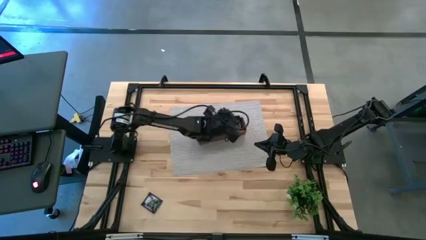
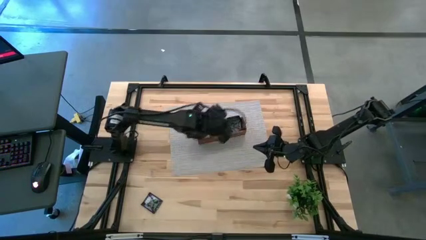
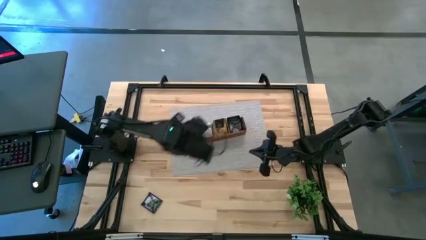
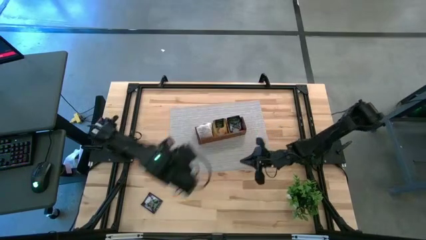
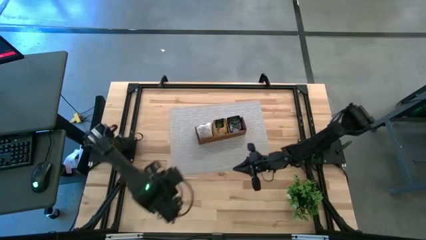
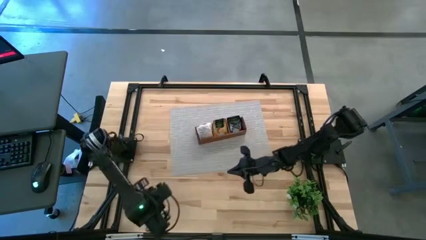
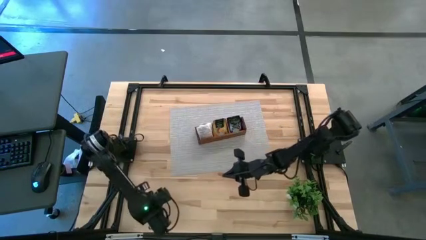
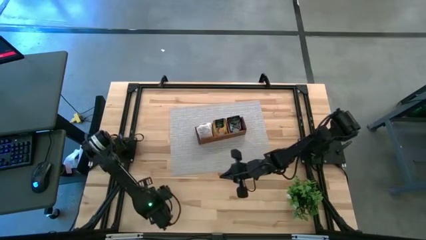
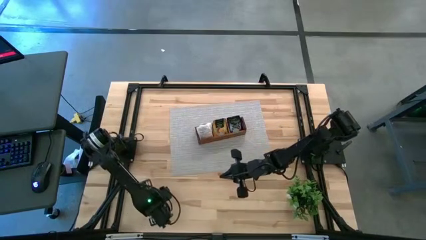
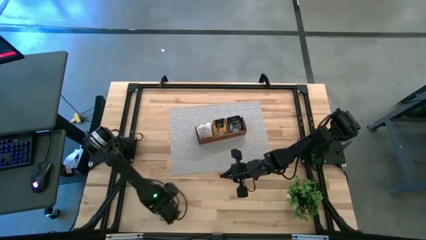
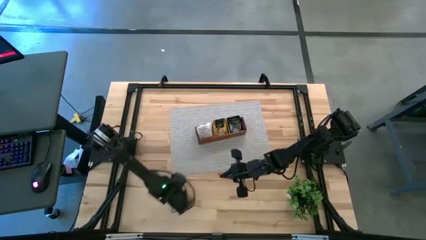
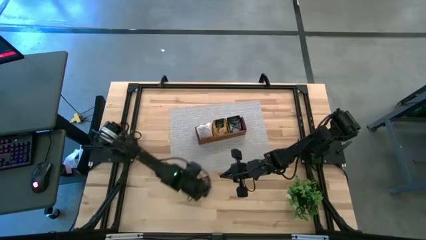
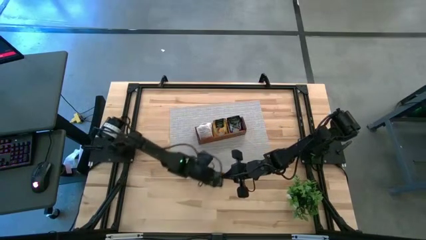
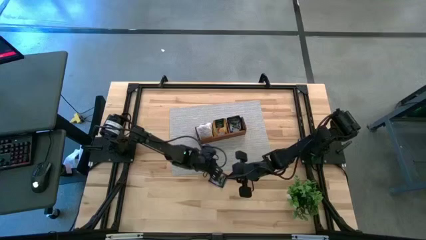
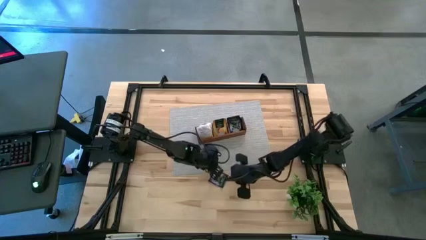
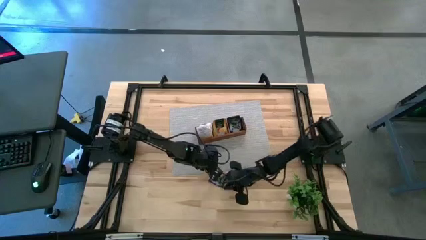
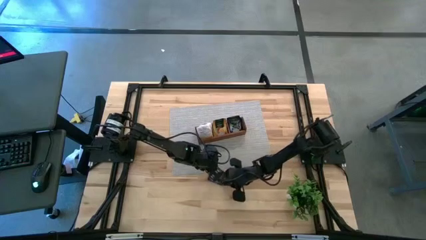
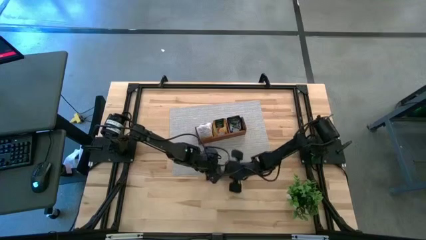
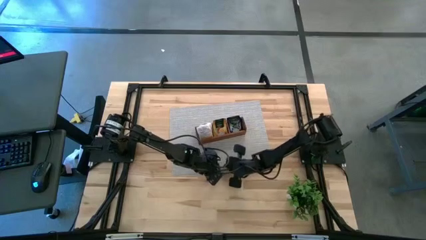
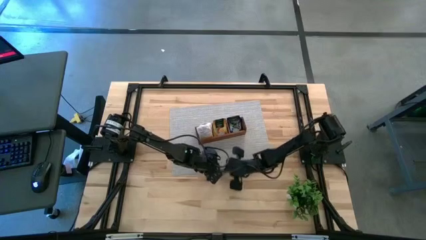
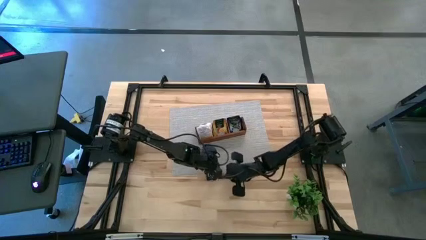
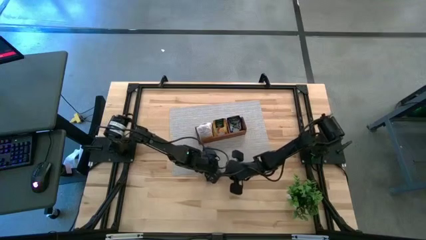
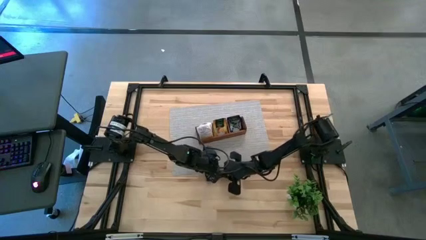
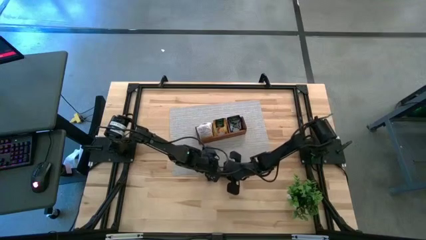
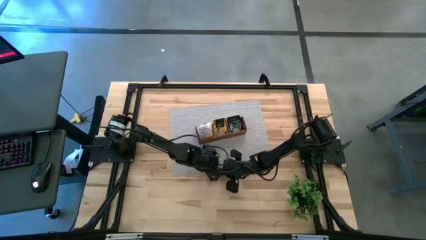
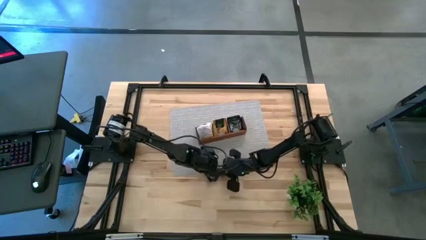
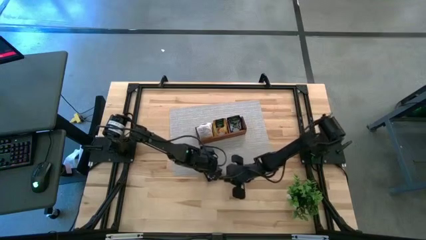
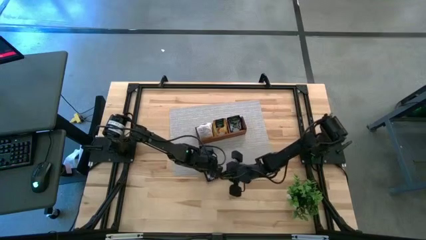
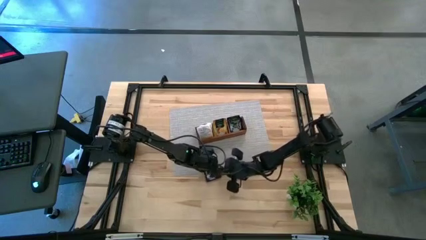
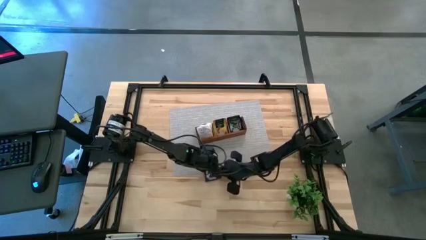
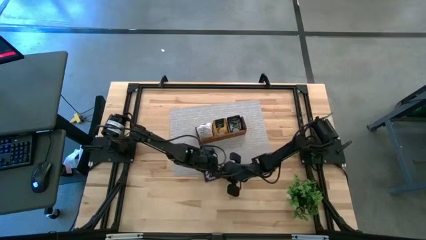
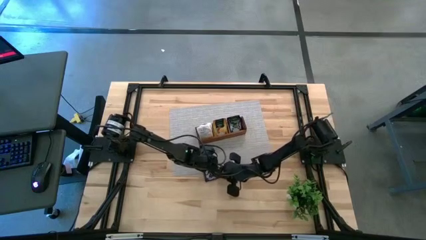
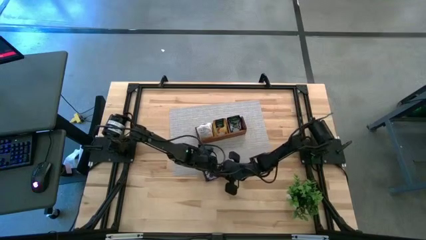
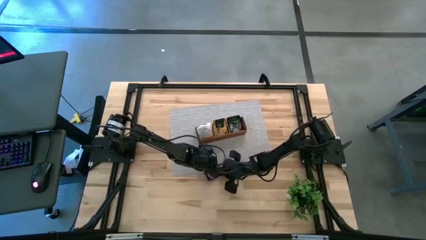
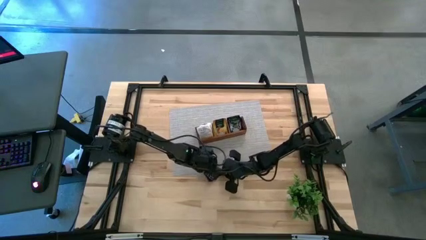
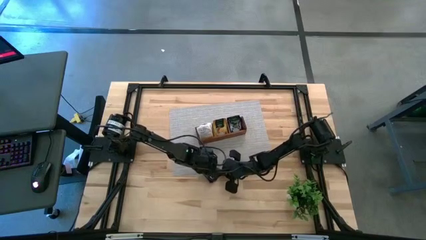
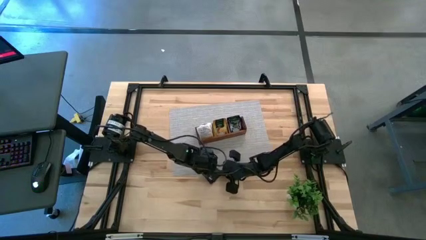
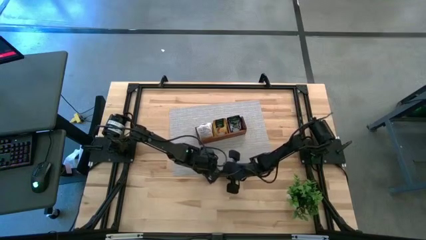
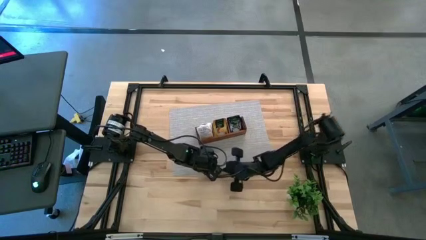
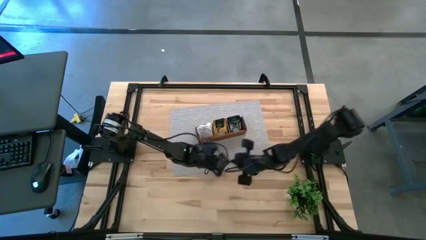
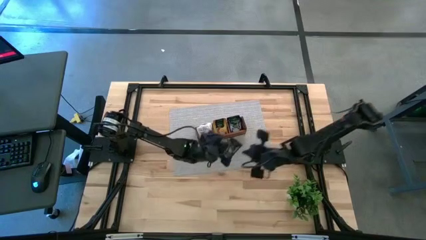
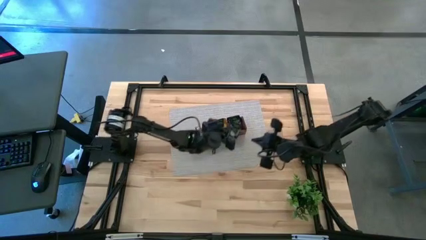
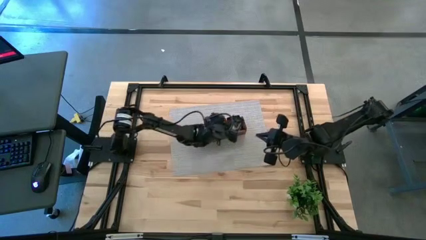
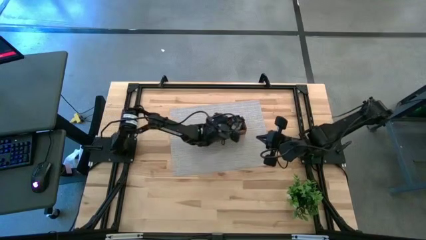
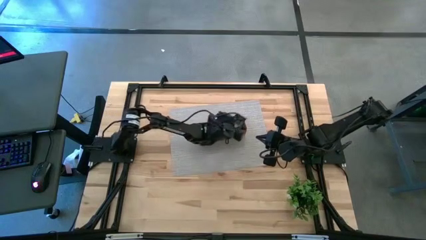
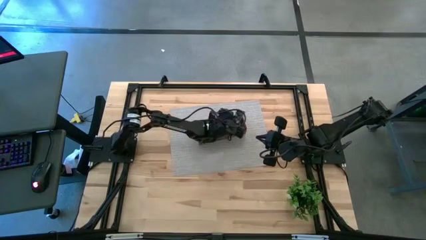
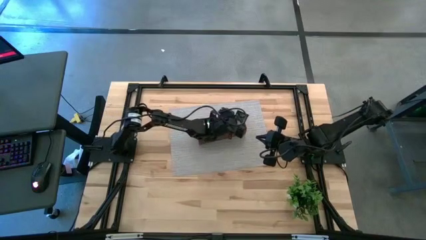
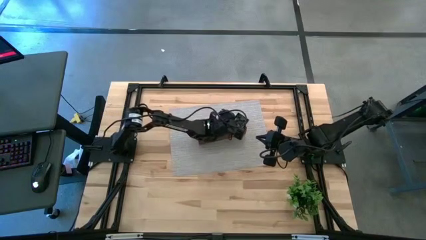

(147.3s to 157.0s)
Task: Pick & Place Tea
Put the violet tea bag into the right section of the wooden organizer

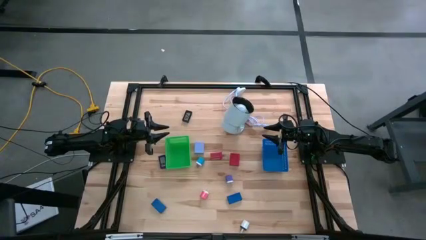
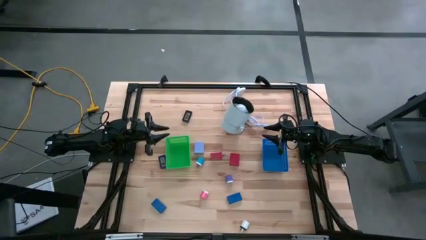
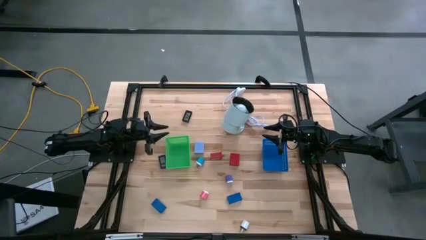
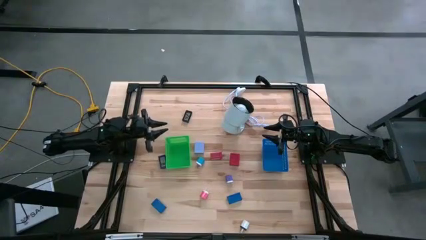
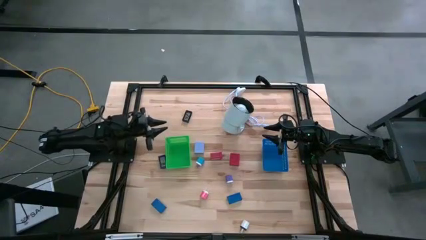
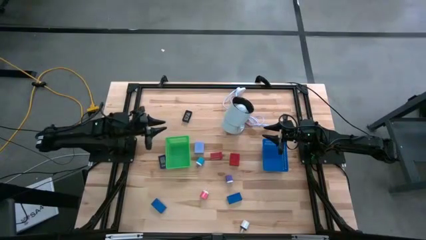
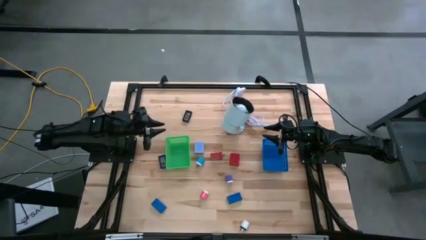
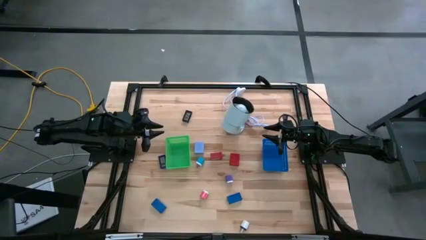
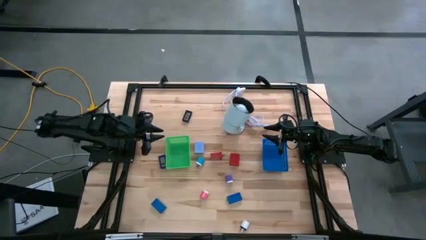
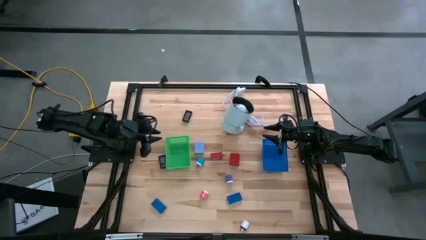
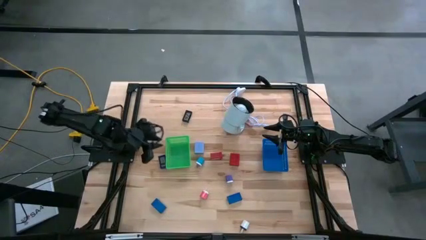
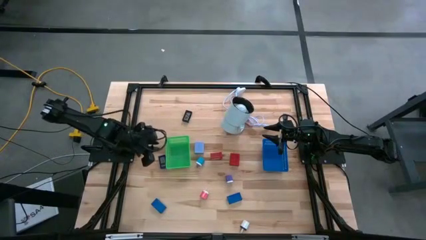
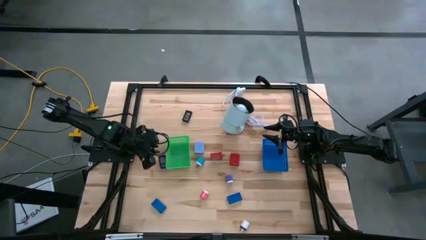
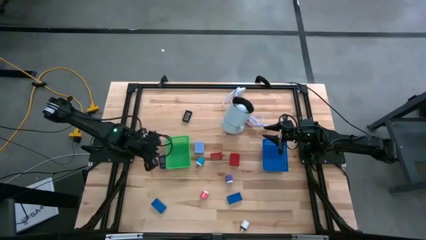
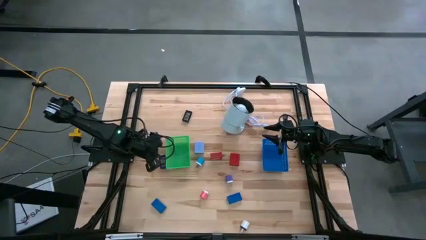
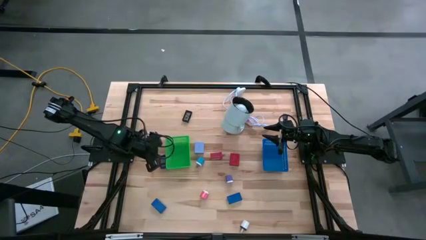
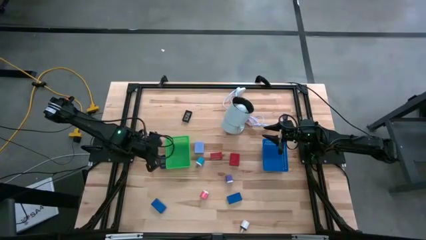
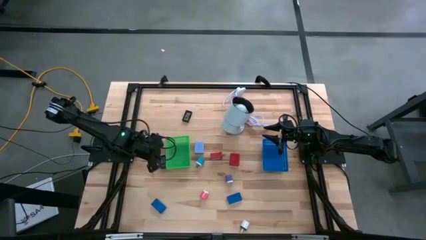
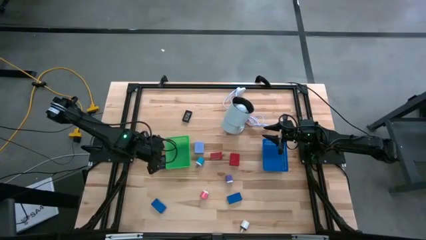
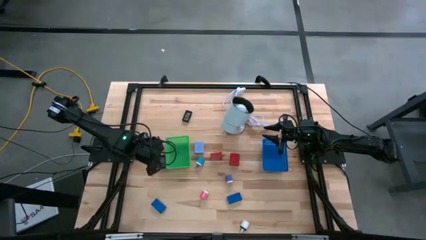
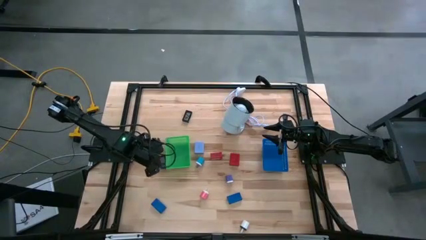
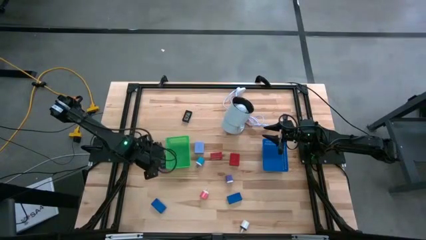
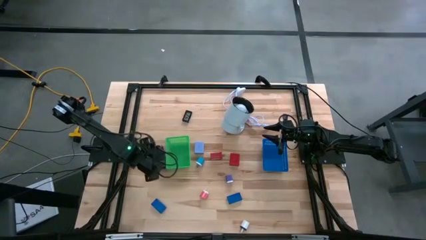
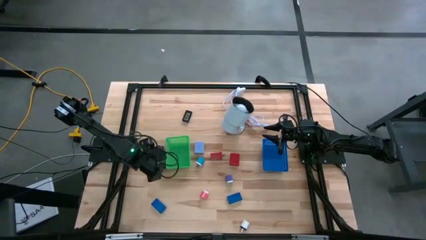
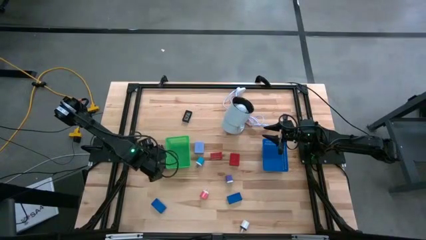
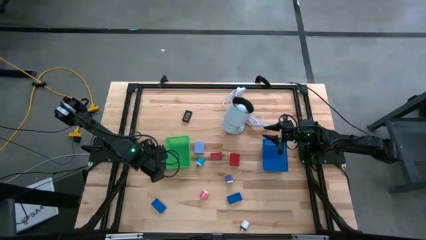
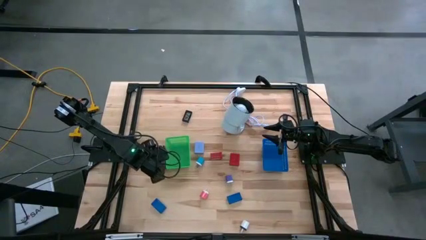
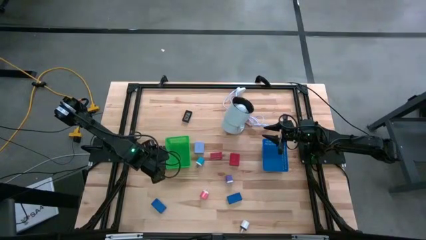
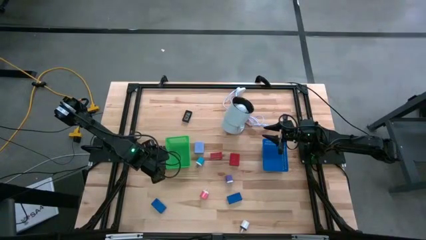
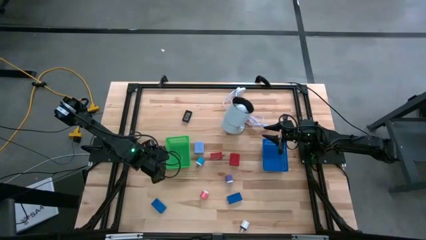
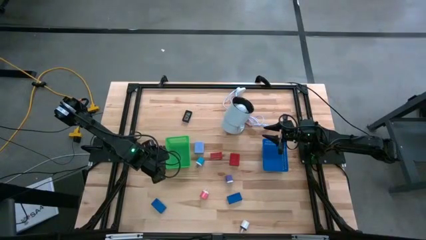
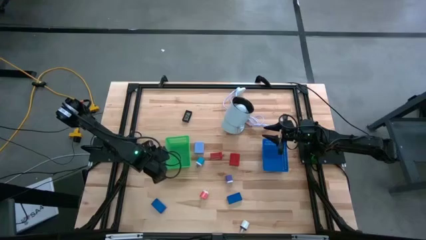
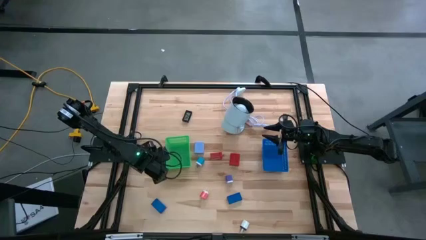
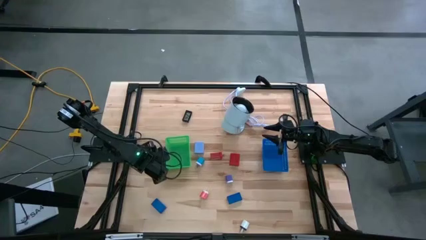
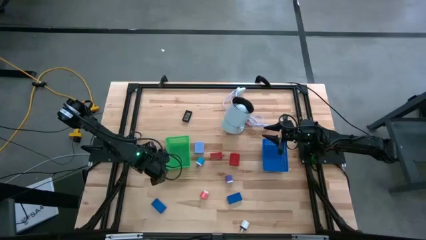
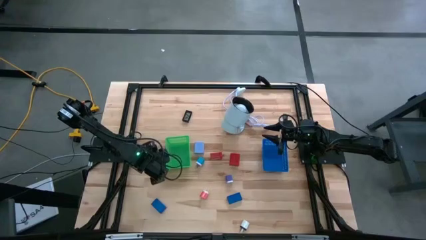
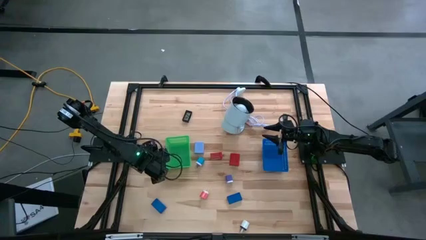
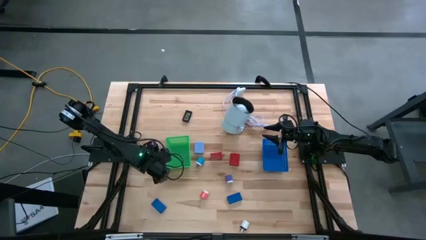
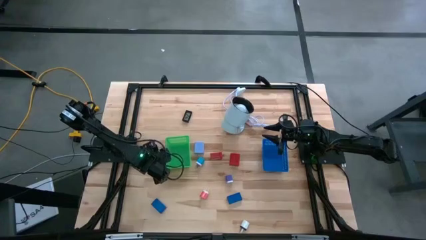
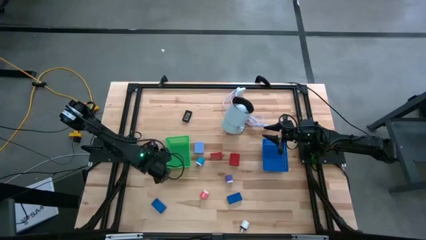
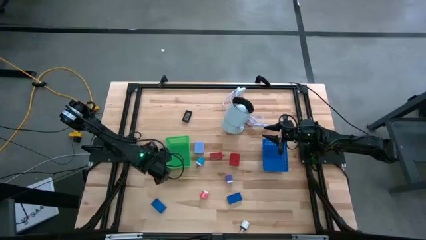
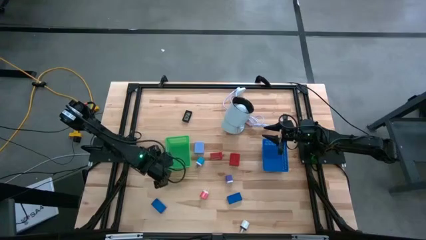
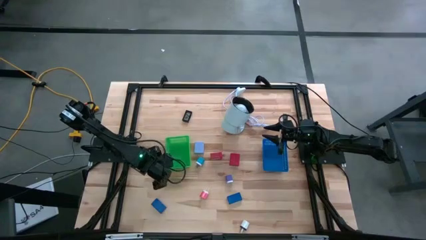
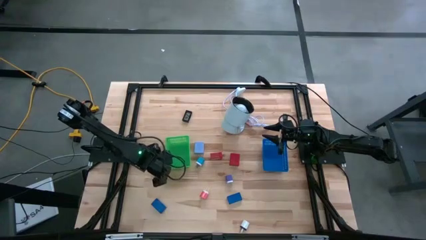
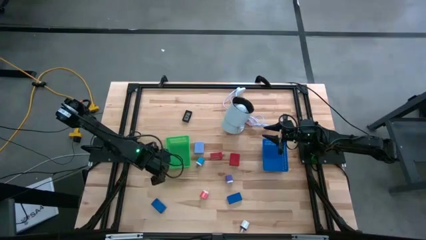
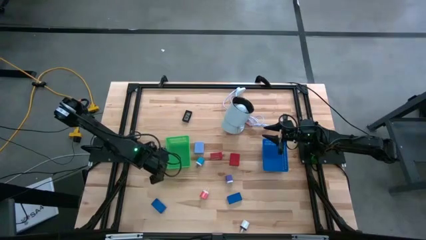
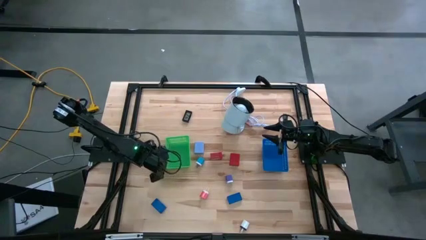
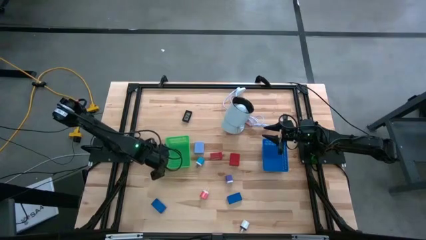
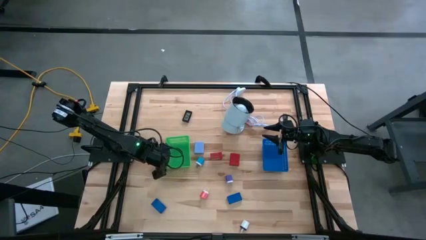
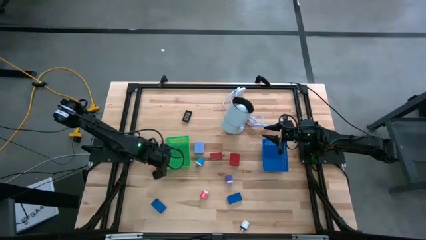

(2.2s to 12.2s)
Task: Pick & Place Office items
Put the top left blue digital timer into the green bin
